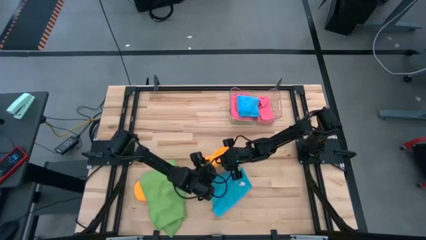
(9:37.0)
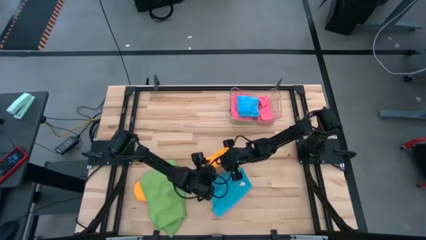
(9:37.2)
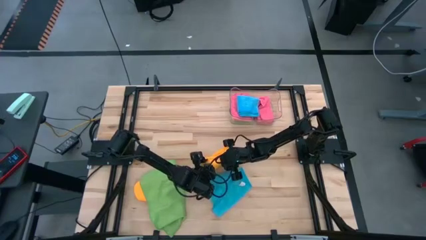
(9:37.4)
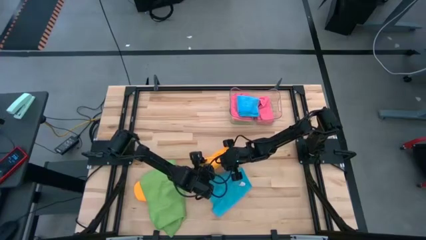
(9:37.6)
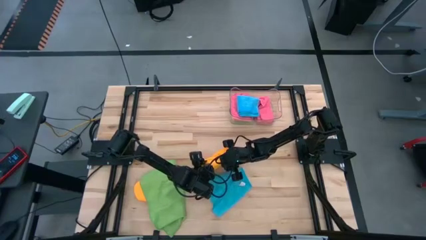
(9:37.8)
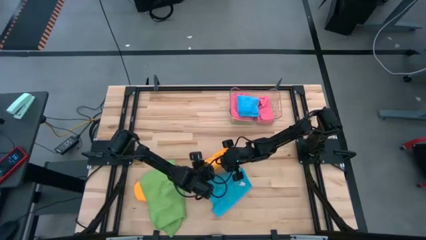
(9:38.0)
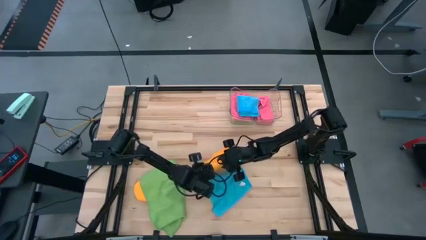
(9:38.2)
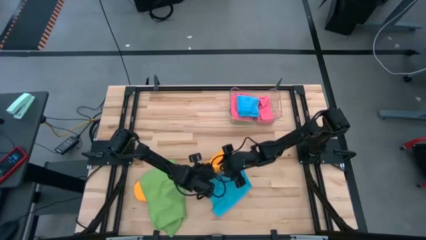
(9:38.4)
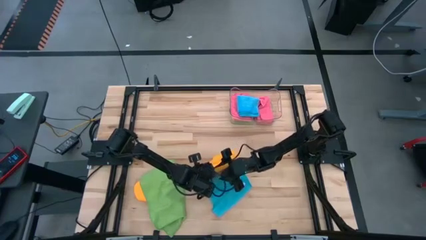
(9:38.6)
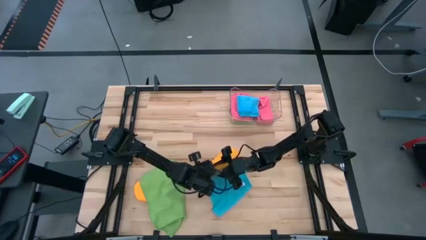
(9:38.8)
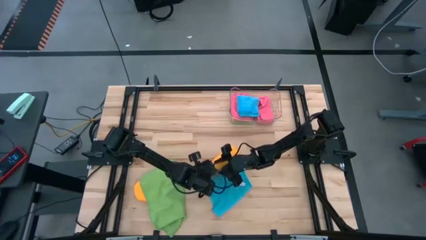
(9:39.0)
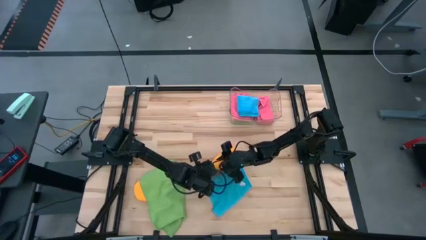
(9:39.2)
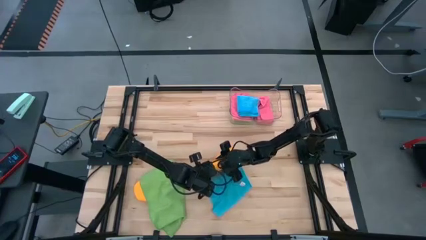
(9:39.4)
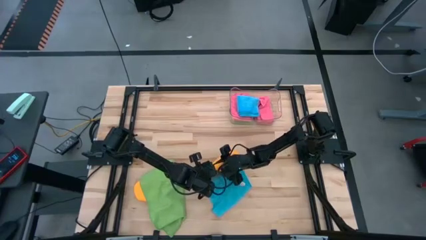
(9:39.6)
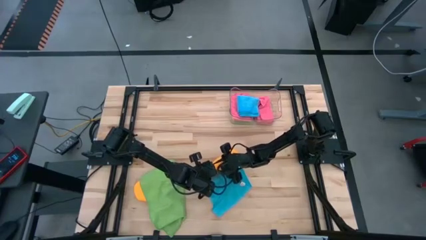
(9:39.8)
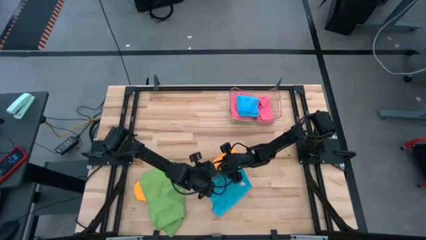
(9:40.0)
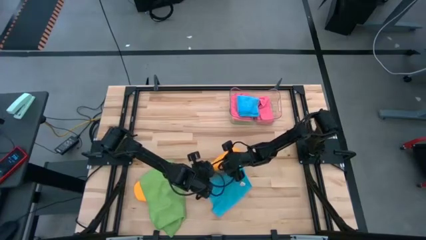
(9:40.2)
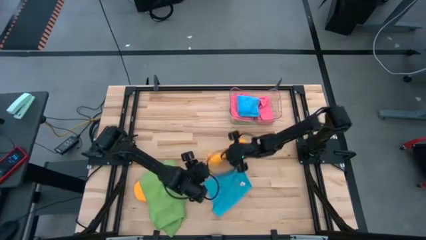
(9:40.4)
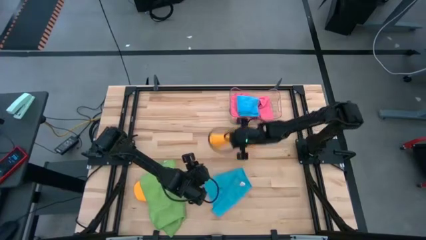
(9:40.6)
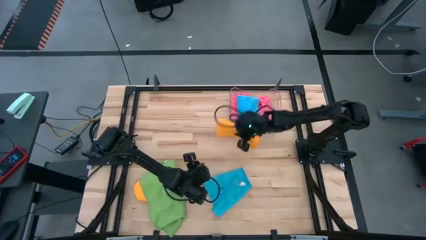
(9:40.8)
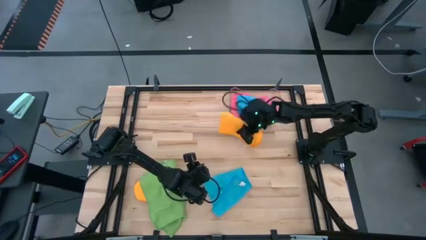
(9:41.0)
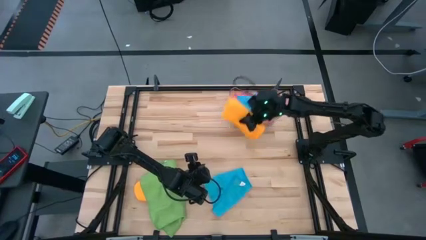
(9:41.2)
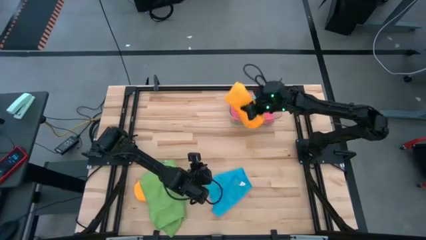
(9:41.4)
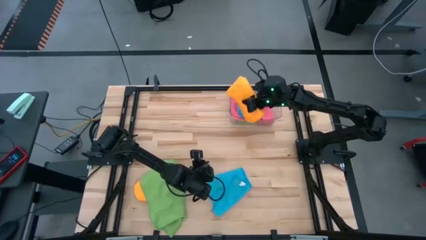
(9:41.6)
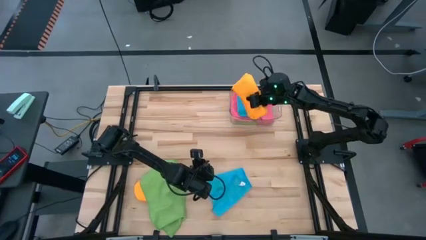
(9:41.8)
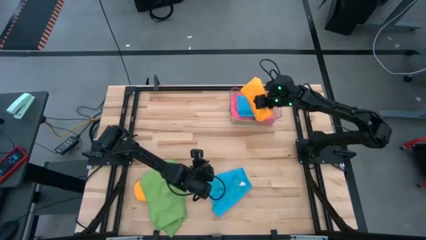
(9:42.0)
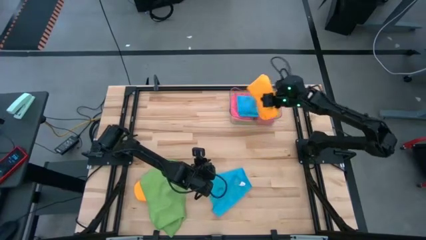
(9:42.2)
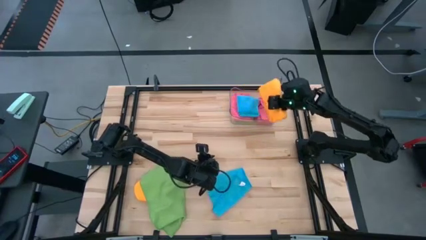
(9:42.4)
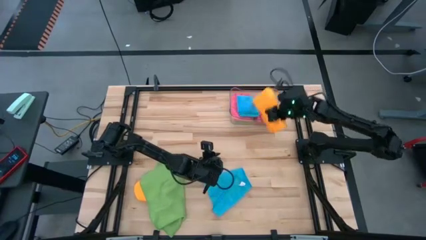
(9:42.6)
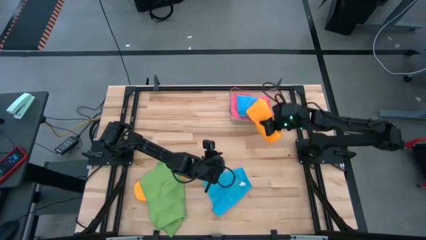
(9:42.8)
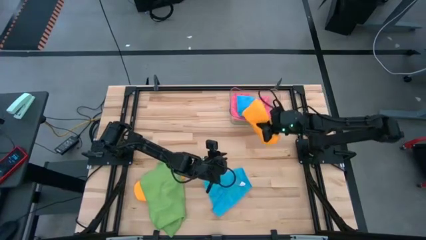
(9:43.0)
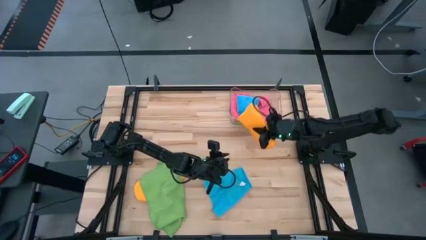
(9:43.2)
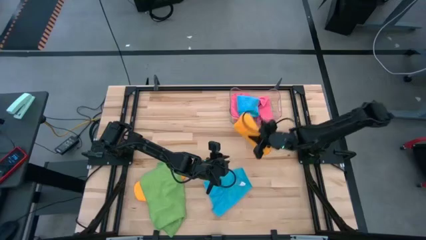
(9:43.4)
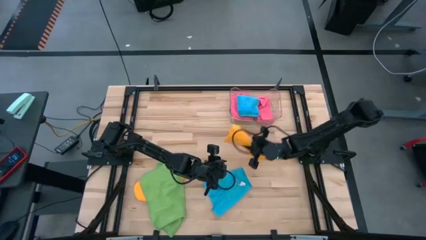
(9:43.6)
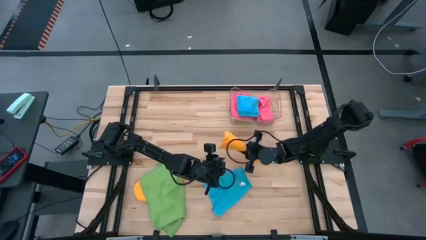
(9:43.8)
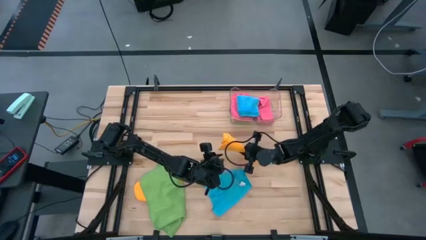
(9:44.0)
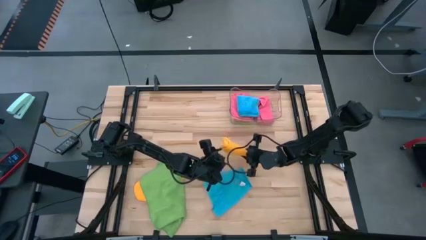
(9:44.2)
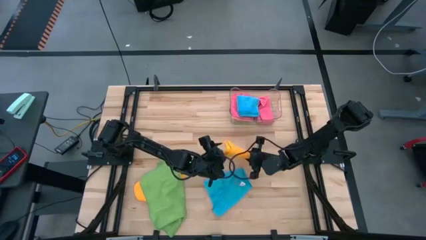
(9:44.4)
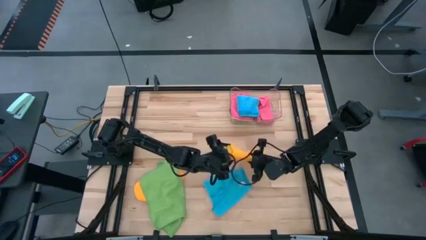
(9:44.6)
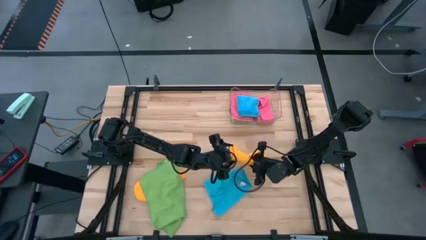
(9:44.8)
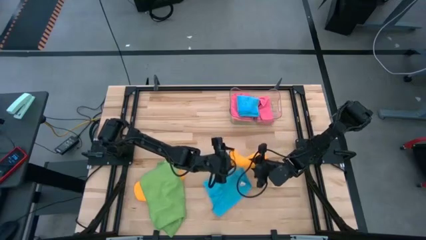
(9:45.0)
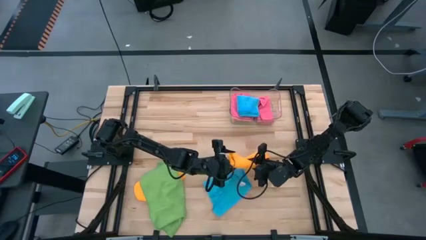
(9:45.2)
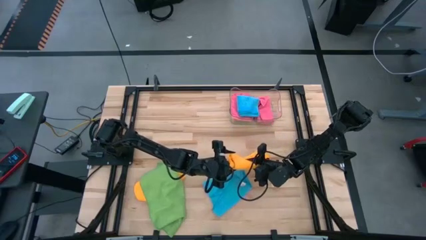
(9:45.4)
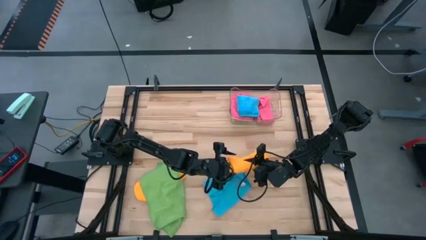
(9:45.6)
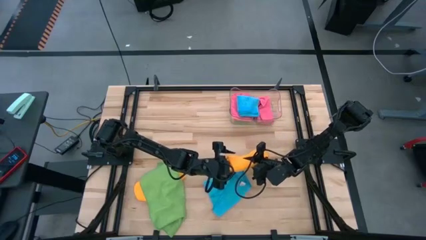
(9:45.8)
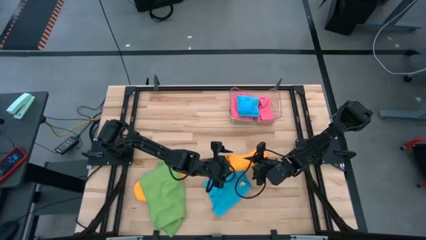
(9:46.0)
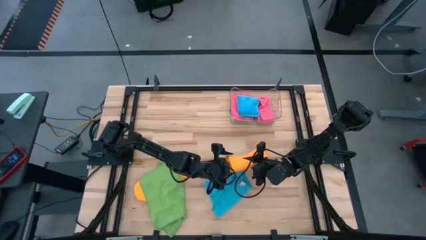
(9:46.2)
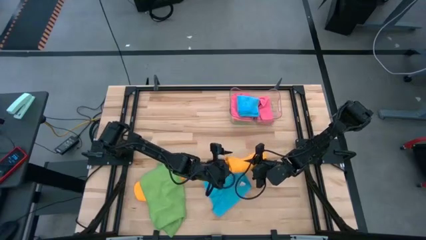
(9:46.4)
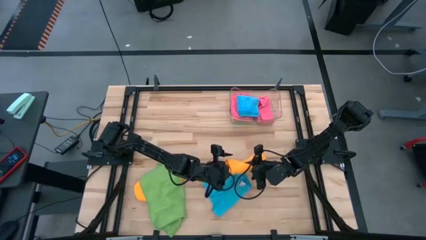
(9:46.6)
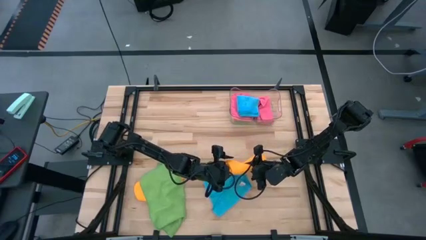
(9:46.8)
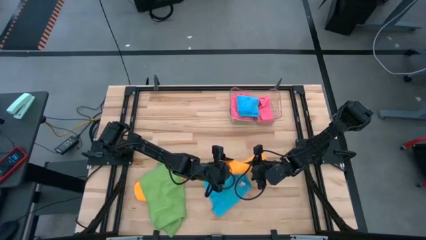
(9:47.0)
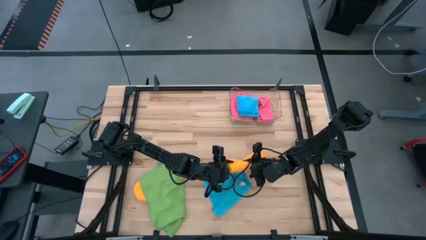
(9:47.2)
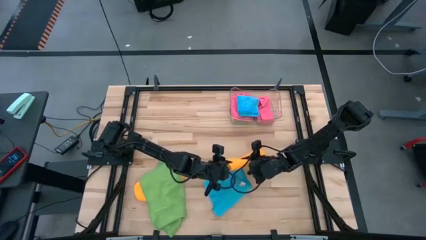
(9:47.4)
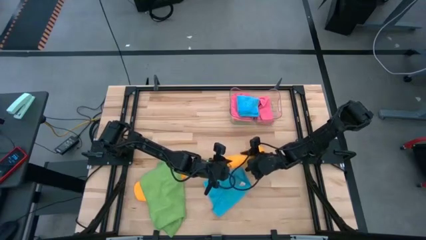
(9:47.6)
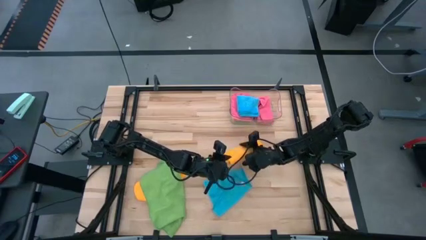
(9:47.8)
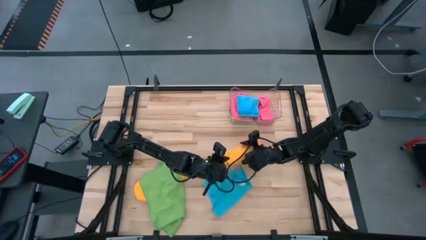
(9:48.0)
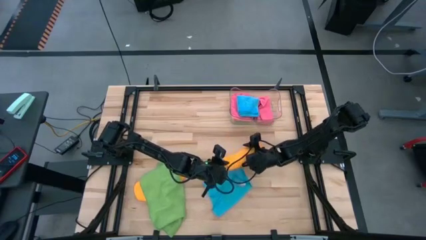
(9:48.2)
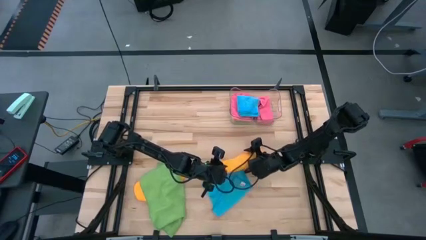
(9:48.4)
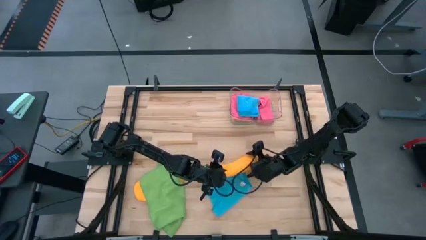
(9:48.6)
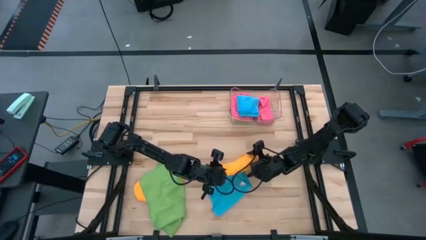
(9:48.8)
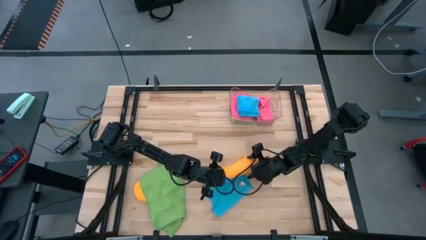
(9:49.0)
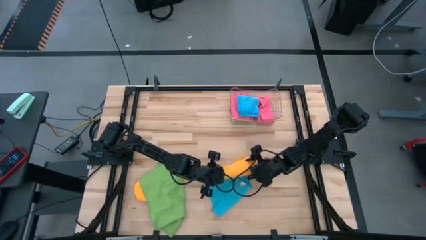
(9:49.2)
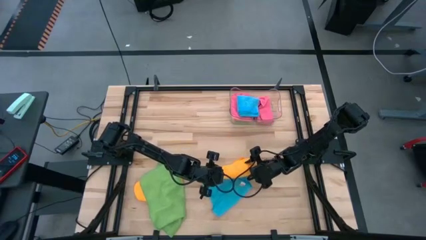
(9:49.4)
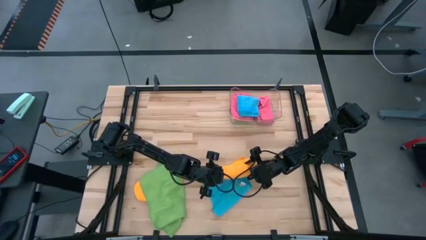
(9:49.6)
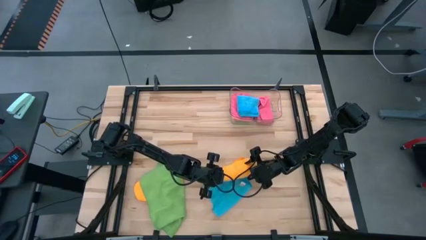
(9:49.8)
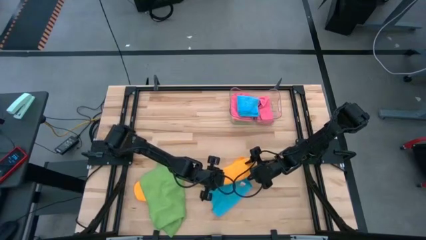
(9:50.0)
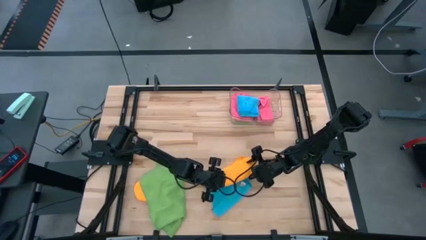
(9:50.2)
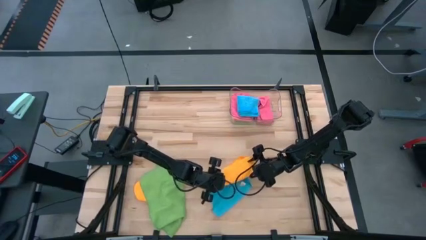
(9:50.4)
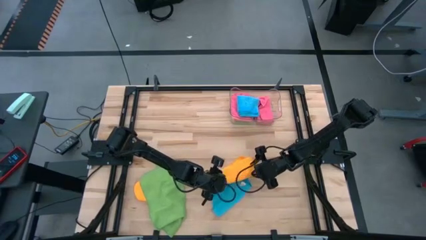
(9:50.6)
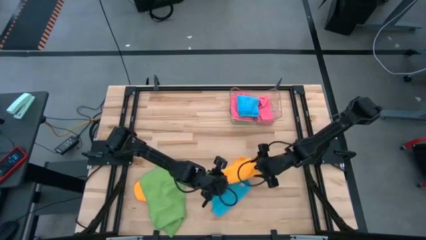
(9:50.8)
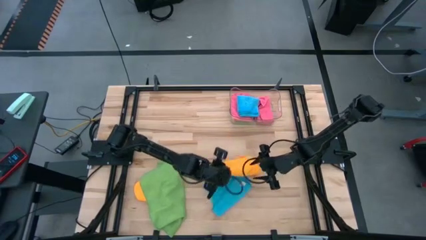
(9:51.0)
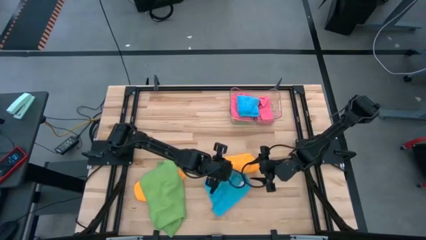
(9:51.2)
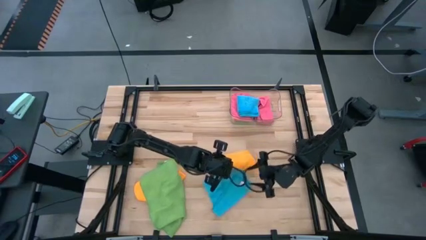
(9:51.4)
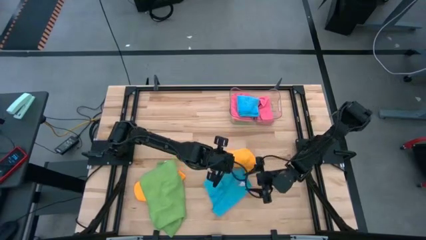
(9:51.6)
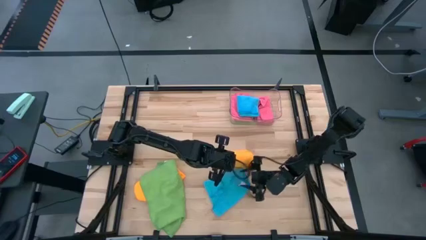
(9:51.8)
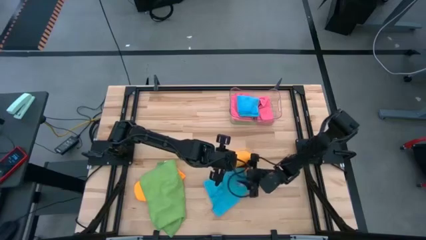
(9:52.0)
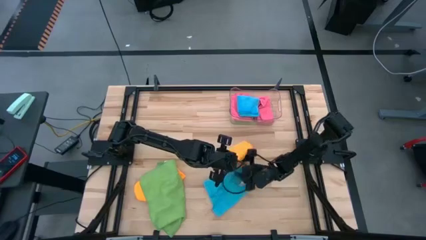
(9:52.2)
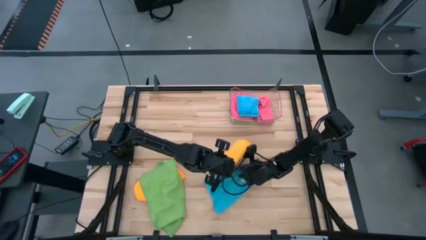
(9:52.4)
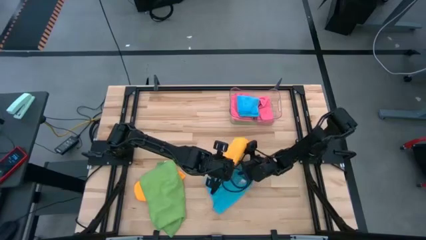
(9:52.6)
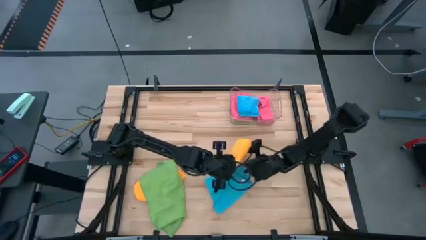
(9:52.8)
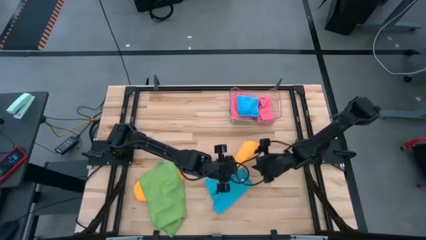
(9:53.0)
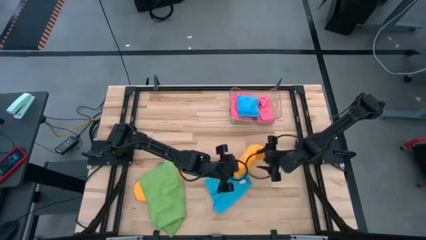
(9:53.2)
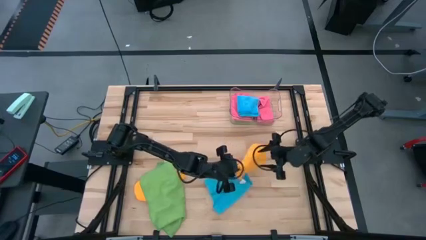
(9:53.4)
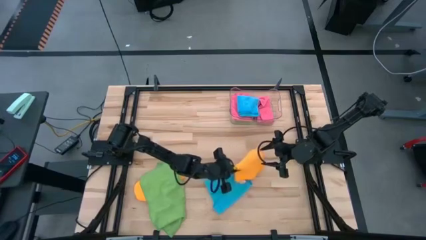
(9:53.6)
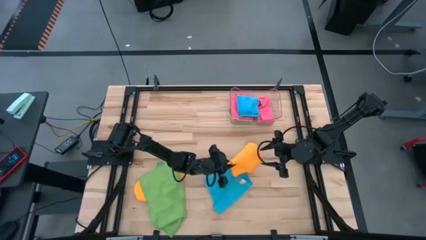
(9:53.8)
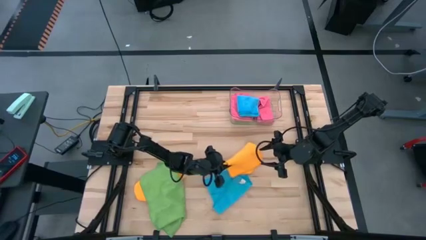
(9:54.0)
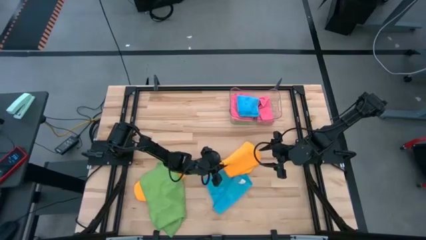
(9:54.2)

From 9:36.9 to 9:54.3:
Task: Fold microfiber towels
Fold the right yellow towel
